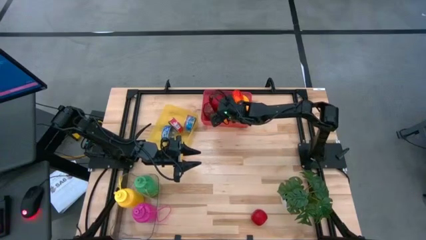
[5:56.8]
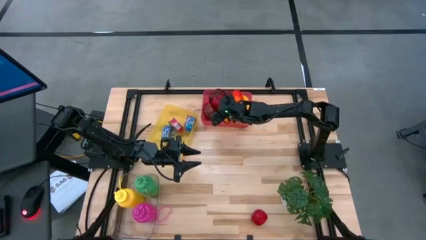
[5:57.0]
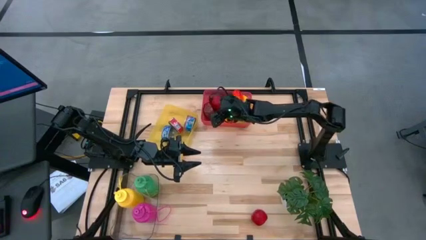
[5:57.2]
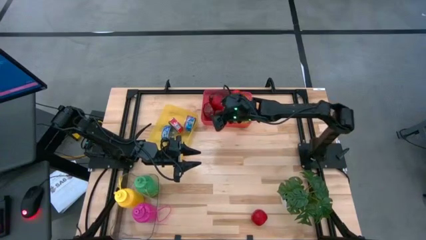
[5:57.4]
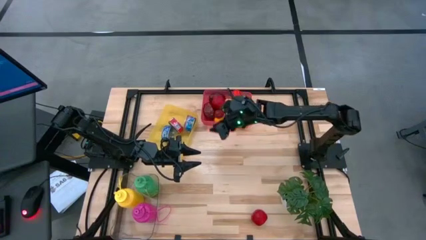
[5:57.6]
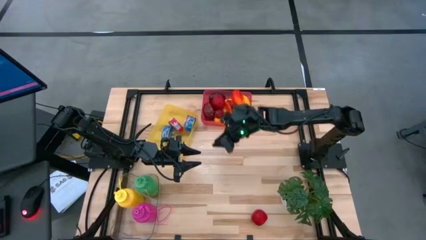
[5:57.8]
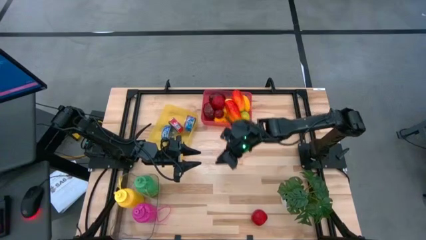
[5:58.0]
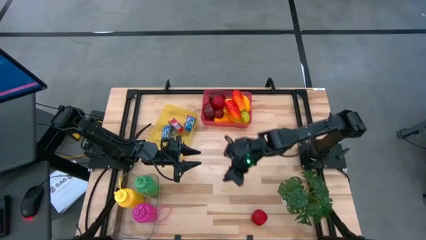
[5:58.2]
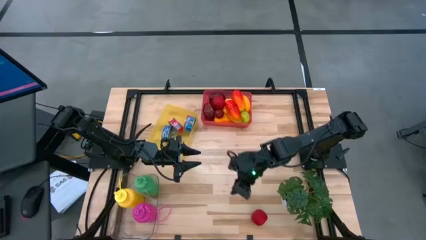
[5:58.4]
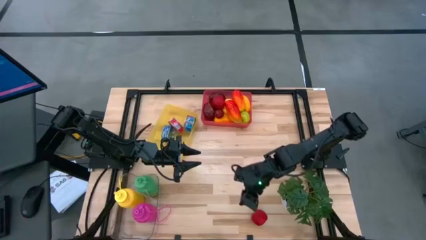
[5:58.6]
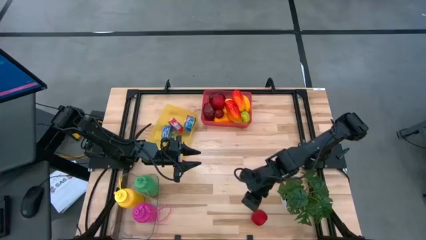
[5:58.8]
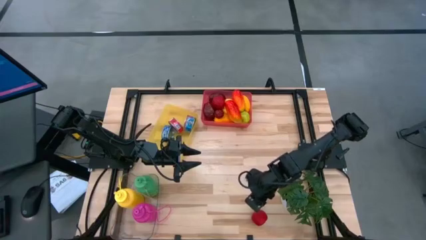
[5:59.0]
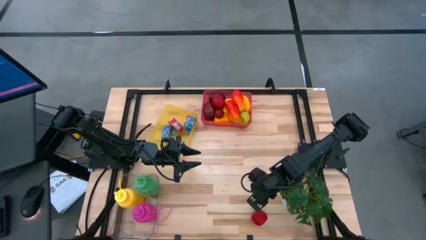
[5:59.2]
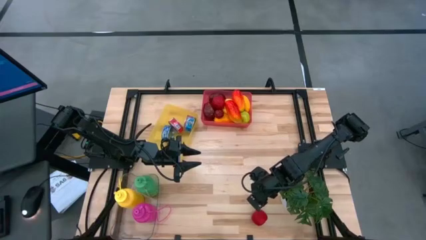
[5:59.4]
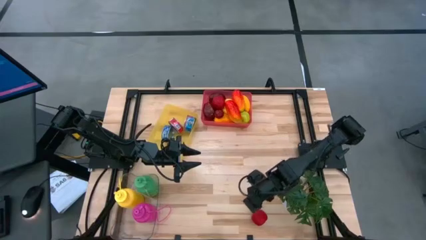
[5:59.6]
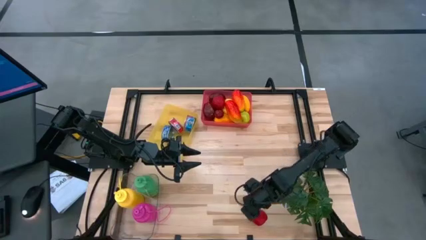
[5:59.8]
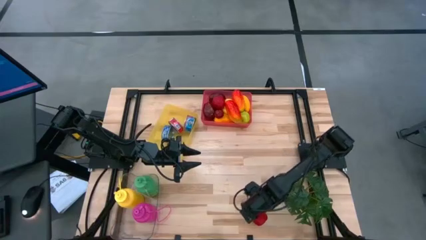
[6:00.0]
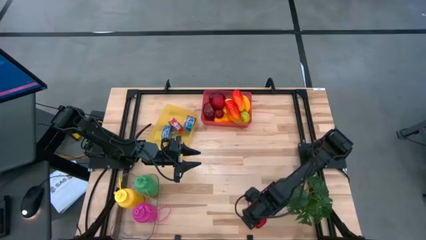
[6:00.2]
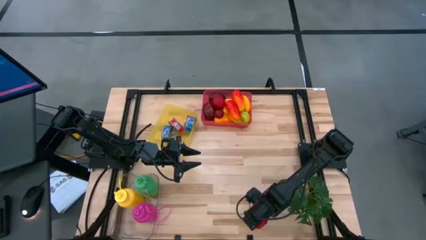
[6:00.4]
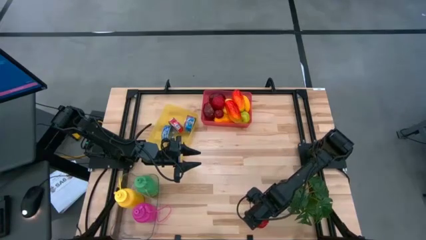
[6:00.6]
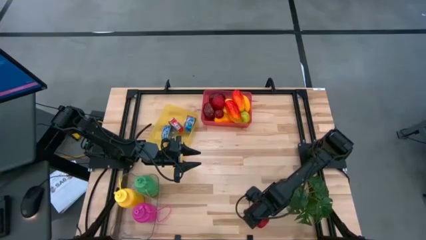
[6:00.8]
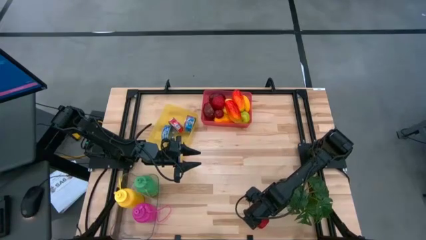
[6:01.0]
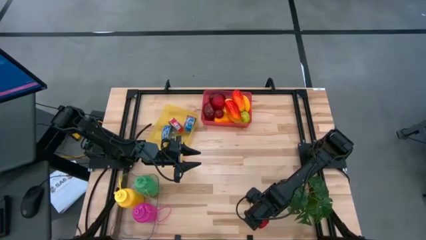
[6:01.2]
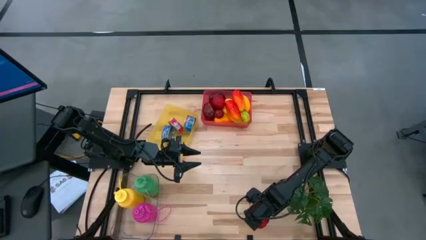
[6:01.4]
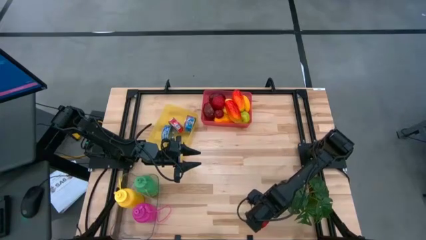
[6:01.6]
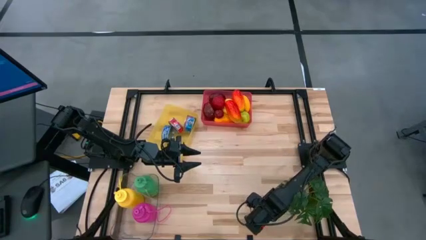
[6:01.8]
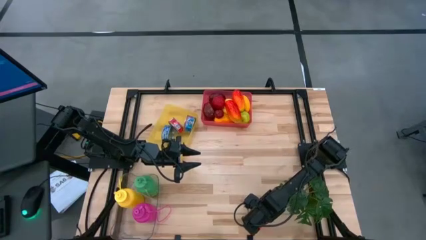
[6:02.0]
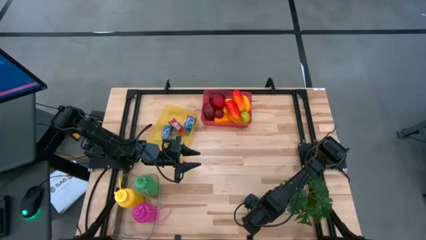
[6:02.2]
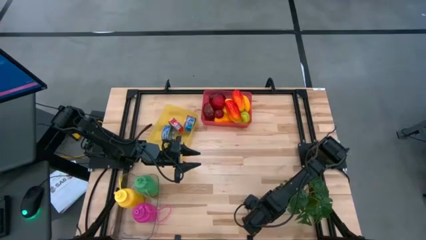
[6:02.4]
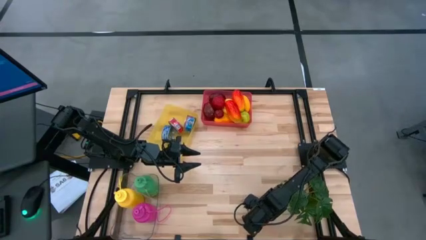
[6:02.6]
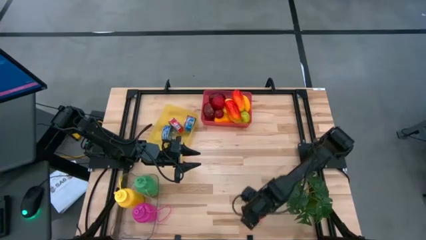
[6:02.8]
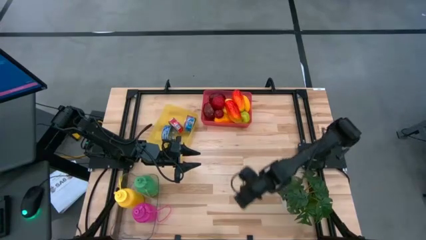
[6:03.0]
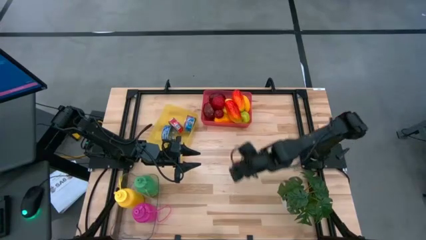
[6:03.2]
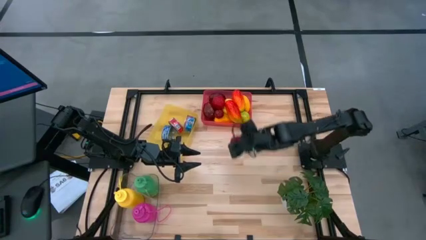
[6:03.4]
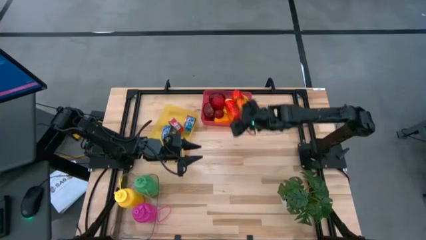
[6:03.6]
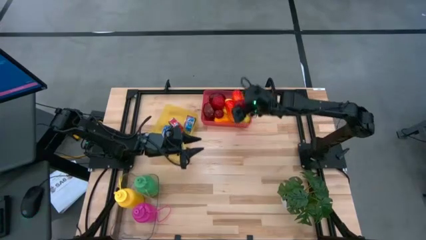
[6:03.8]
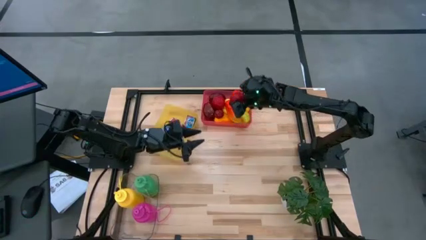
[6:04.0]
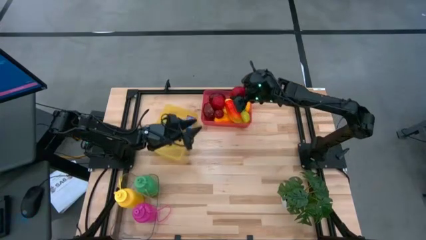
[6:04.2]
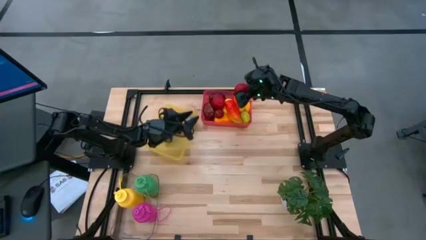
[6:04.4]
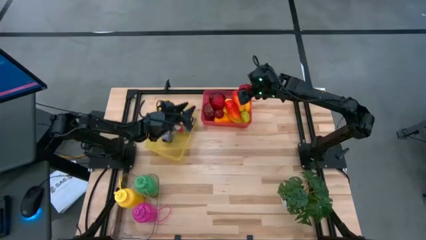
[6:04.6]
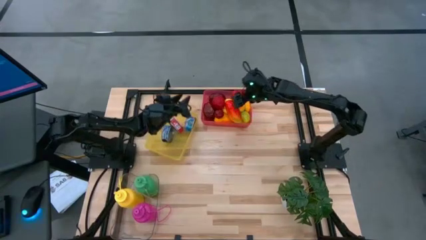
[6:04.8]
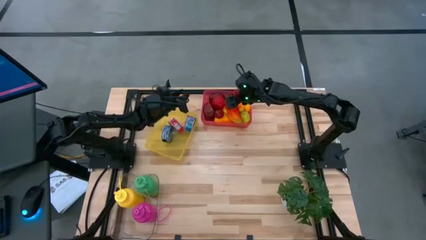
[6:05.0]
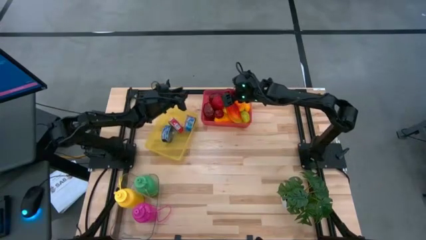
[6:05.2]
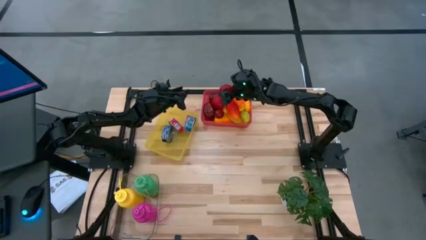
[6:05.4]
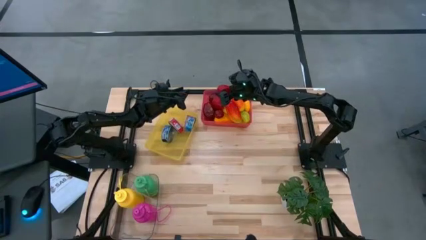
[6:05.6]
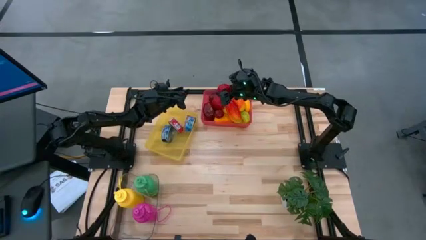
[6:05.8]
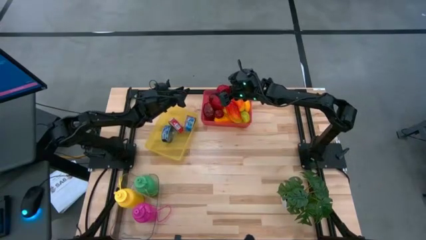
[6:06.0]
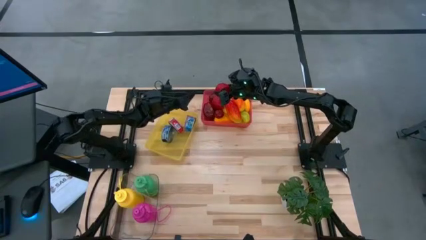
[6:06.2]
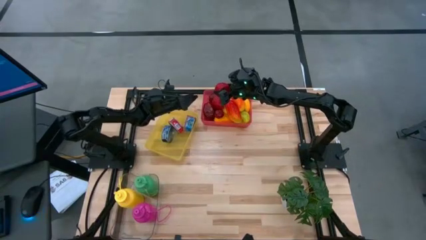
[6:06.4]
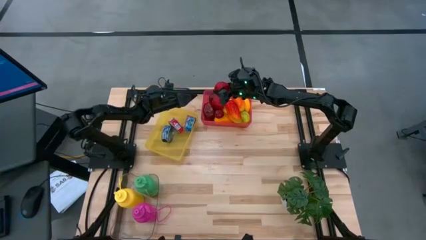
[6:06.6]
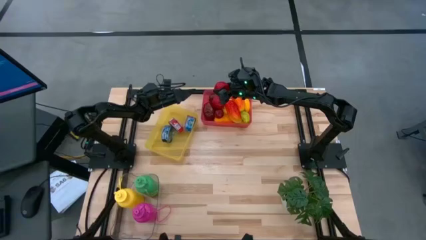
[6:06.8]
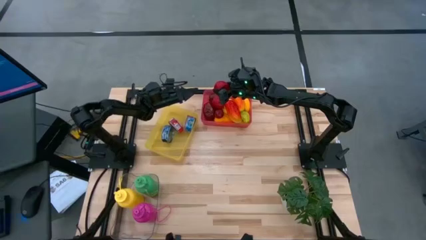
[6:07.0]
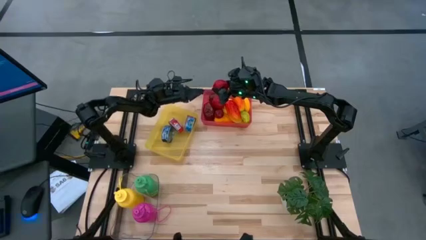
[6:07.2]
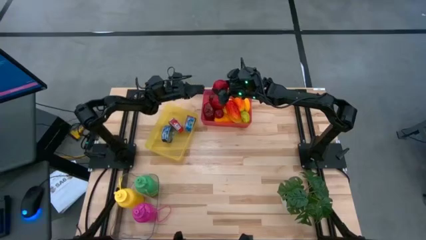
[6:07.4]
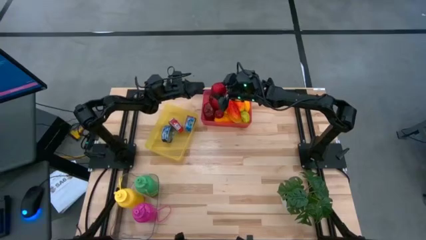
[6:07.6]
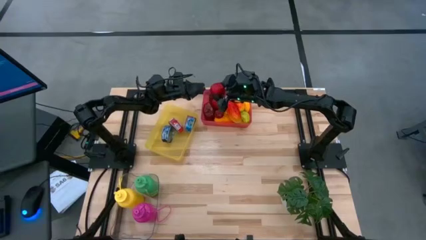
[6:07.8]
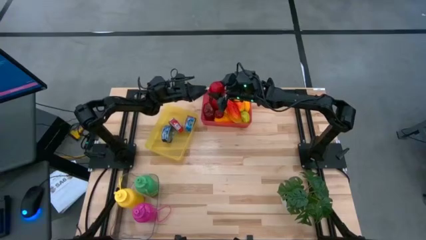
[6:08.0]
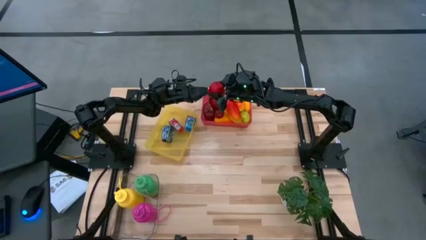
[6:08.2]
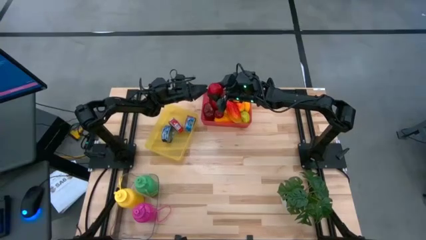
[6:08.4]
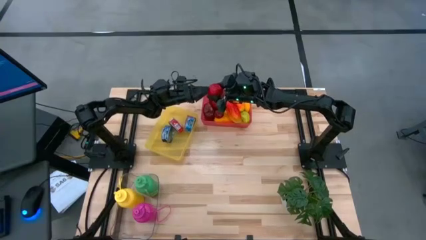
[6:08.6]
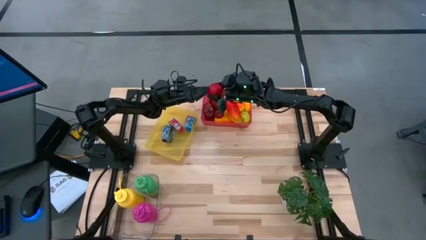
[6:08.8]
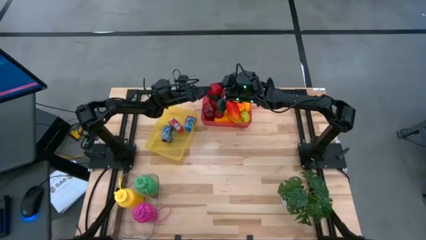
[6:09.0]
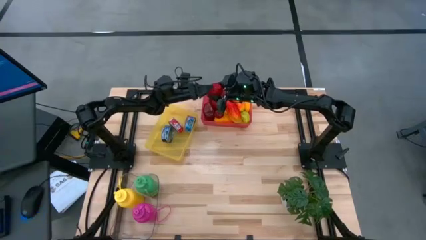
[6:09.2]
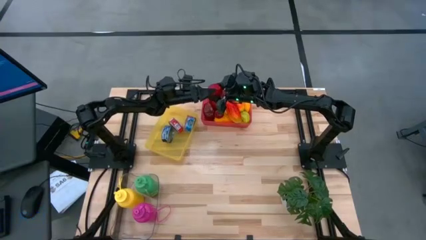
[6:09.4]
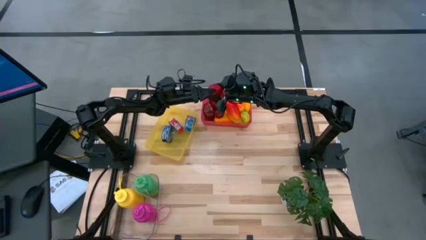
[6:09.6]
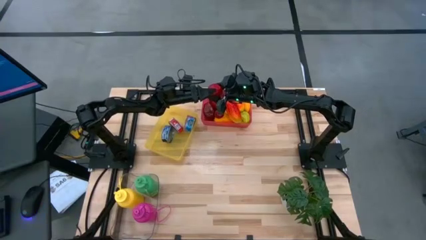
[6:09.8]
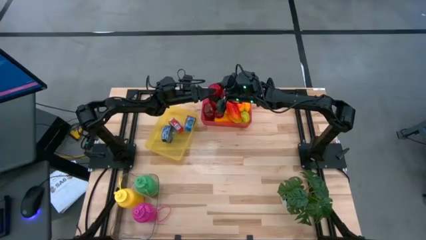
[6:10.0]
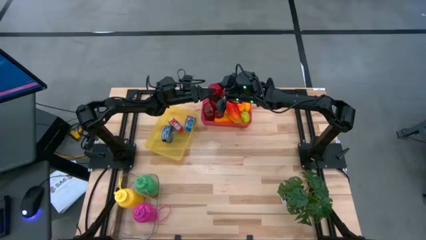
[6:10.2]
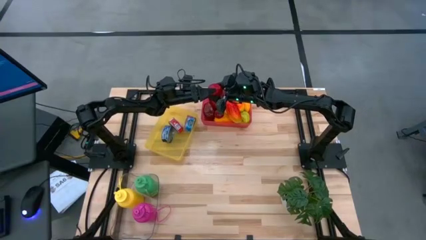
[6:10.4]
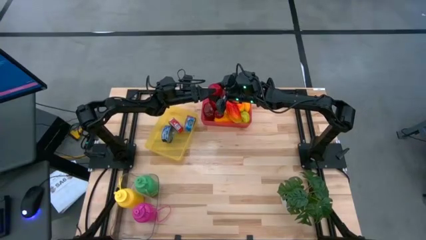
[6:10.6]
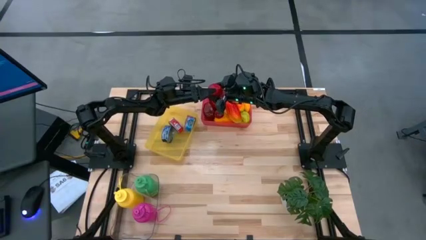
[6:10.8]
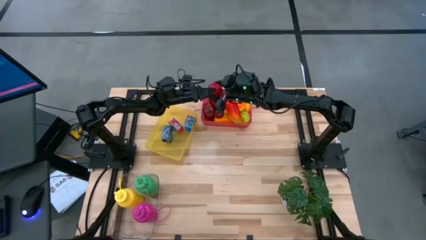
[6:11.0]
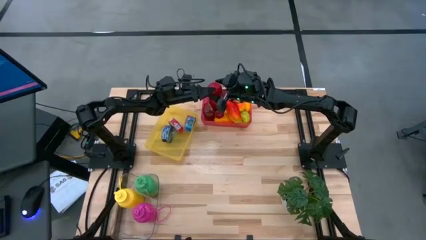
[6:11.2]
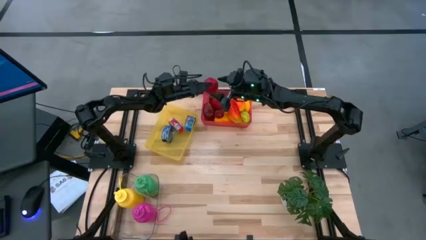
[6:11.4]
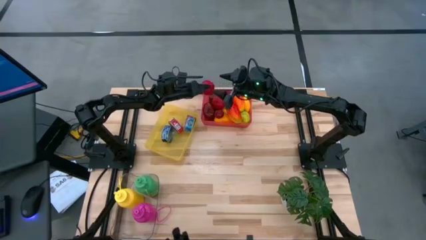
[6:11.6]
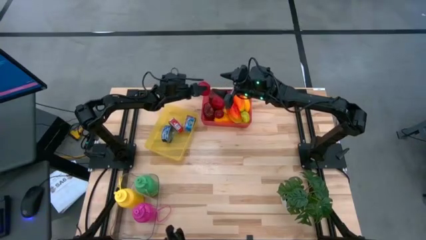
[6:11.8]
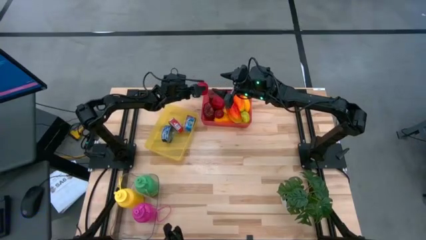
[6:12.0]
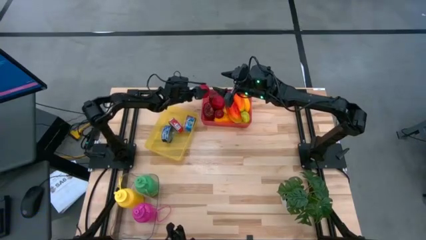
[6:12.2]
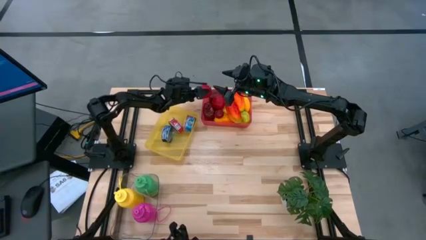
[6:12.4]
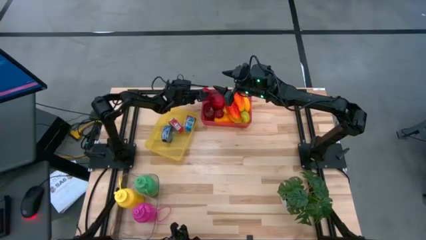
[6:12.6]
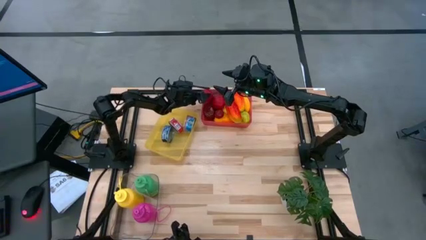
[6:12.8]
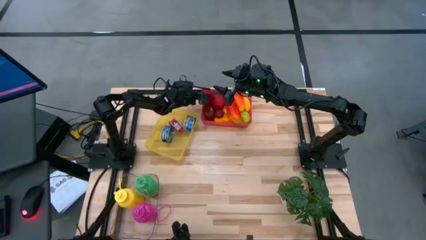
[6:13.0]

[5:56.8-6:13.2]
Task: Pick & Place Food Item
Put the tomato into the pink bin
